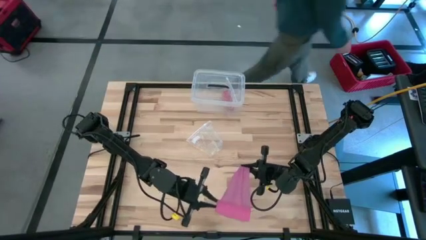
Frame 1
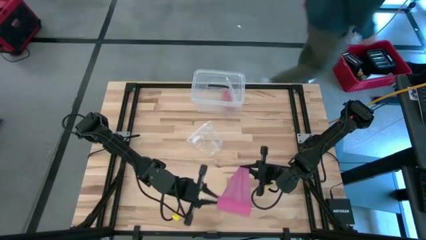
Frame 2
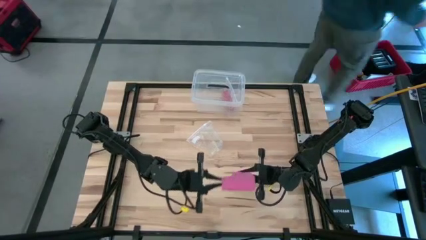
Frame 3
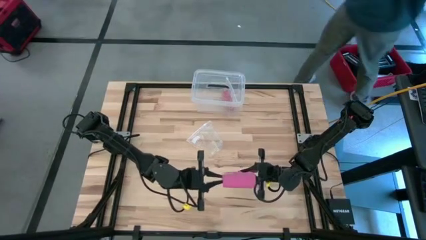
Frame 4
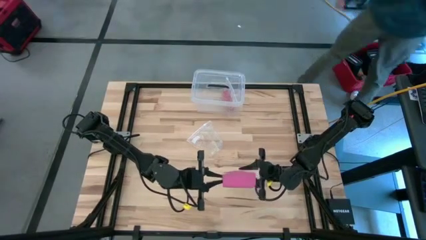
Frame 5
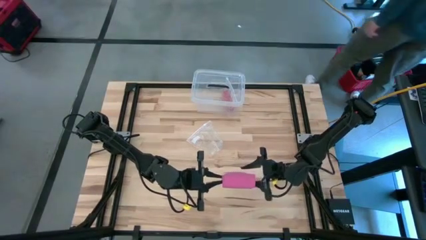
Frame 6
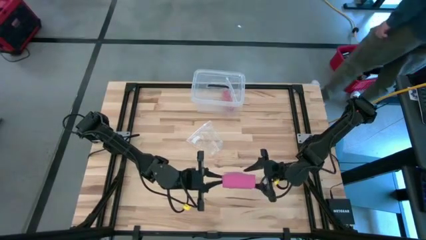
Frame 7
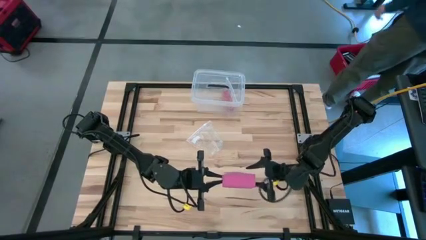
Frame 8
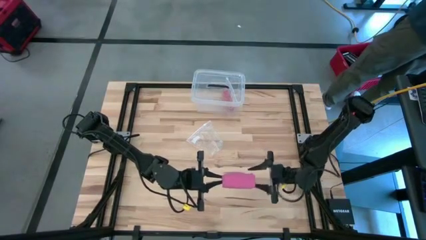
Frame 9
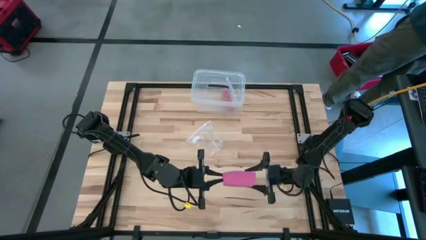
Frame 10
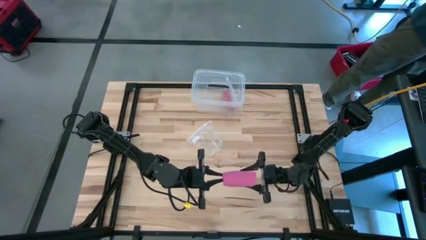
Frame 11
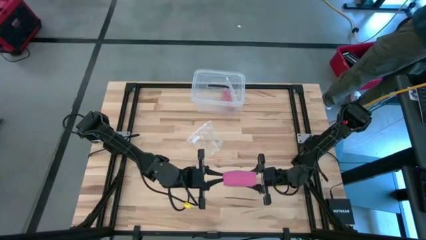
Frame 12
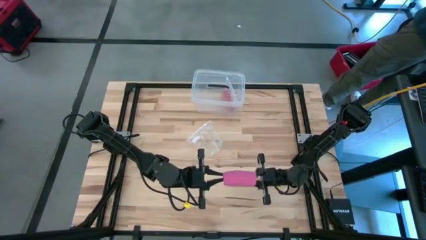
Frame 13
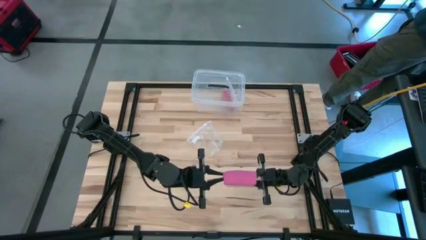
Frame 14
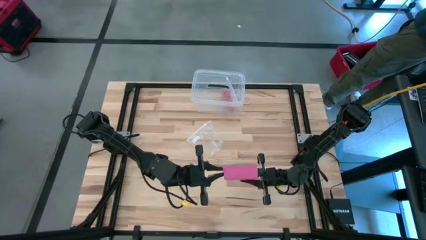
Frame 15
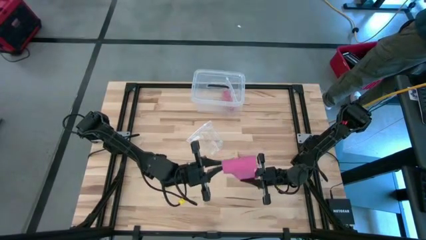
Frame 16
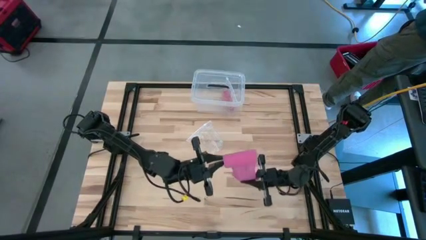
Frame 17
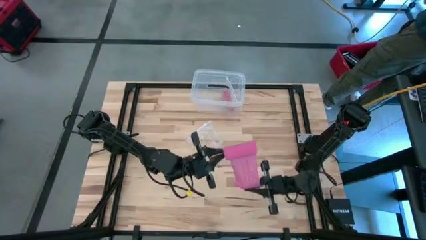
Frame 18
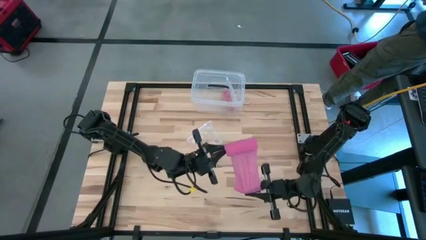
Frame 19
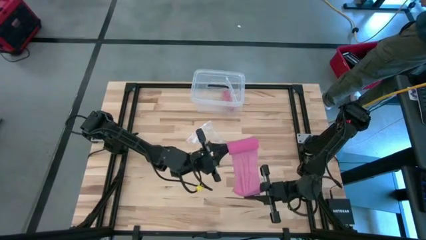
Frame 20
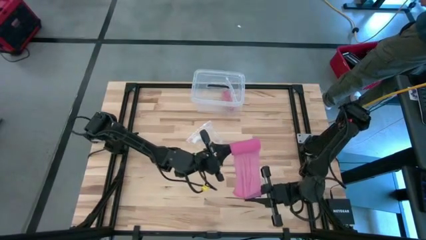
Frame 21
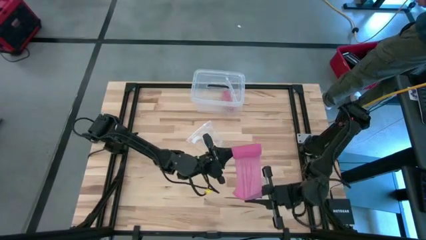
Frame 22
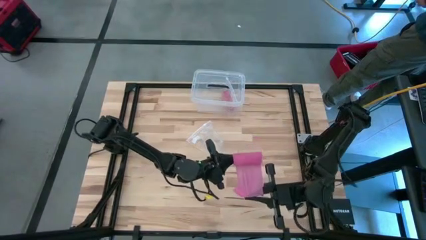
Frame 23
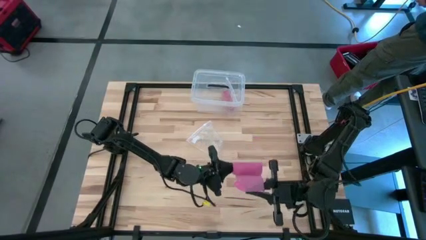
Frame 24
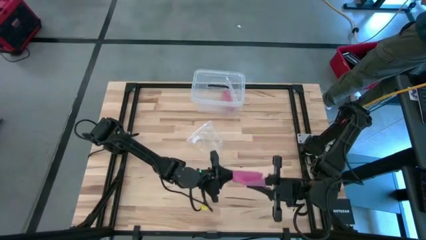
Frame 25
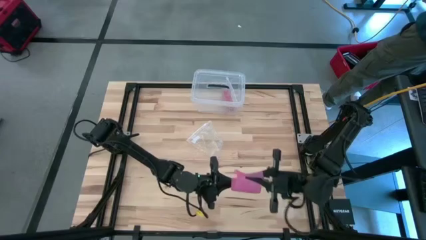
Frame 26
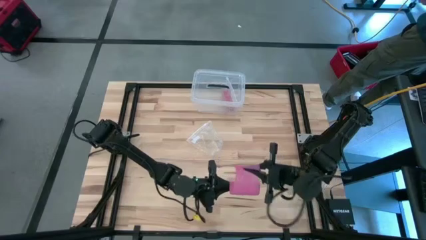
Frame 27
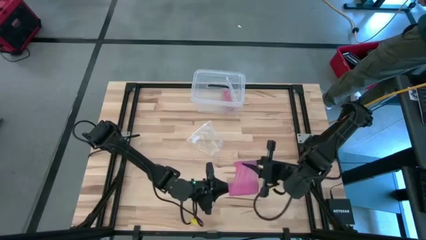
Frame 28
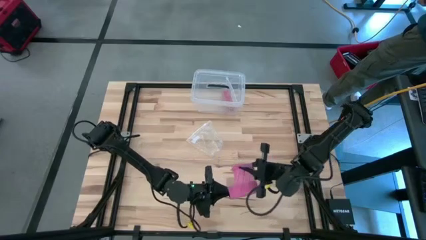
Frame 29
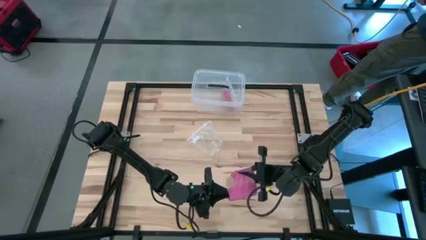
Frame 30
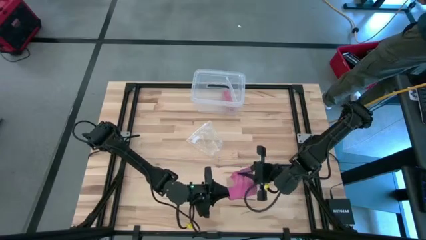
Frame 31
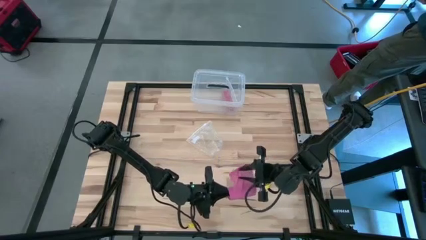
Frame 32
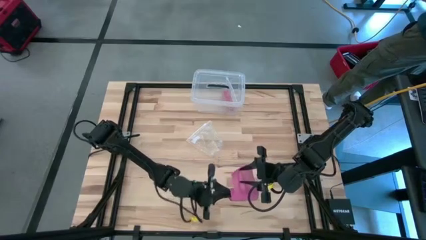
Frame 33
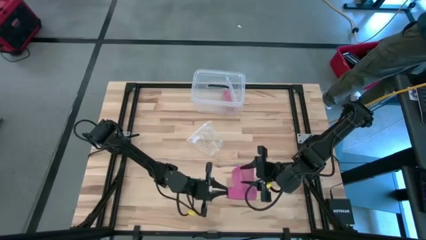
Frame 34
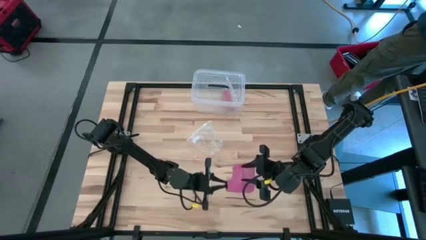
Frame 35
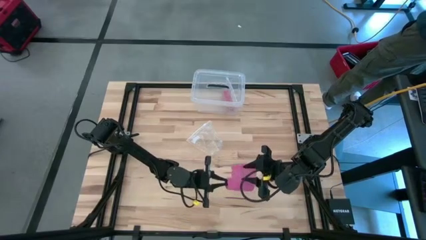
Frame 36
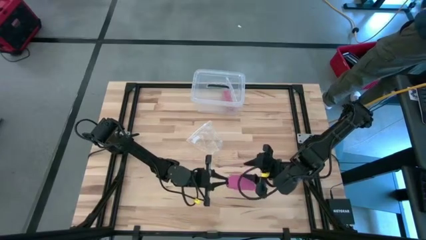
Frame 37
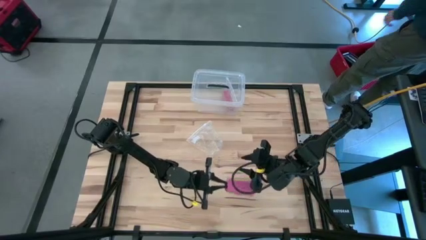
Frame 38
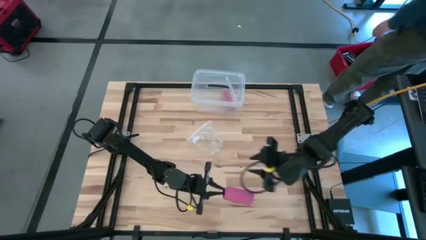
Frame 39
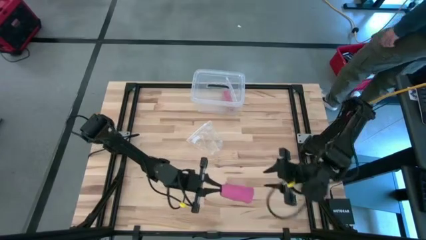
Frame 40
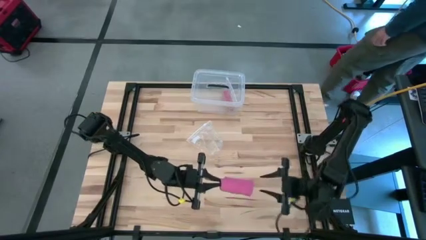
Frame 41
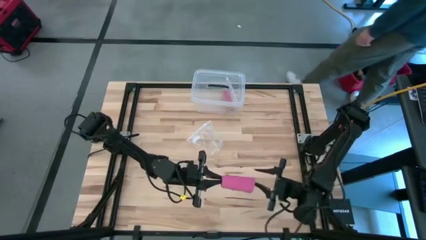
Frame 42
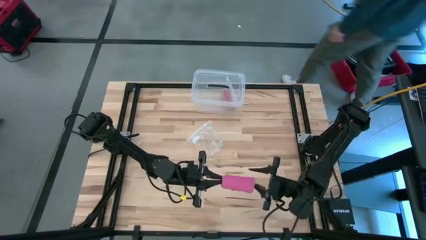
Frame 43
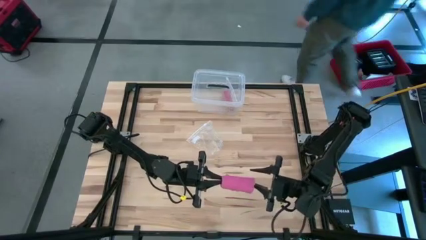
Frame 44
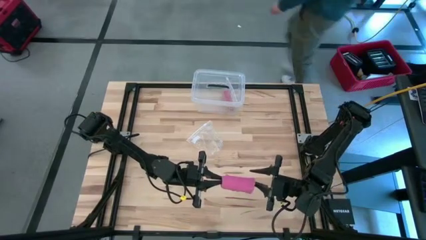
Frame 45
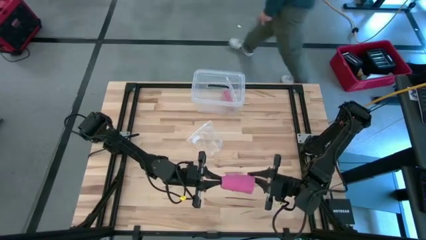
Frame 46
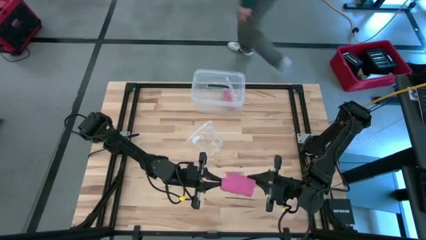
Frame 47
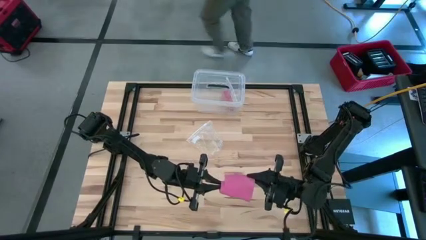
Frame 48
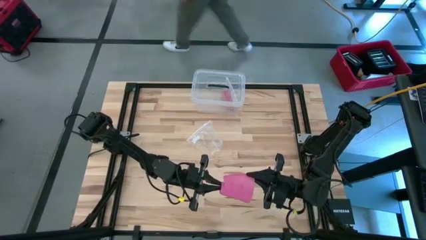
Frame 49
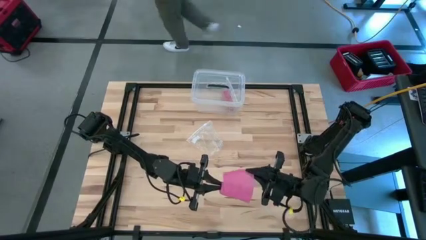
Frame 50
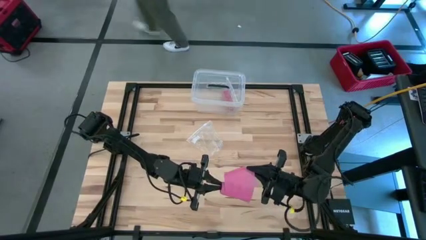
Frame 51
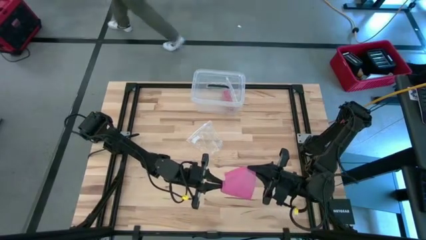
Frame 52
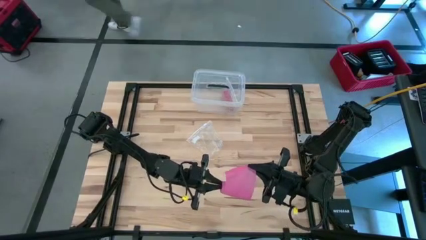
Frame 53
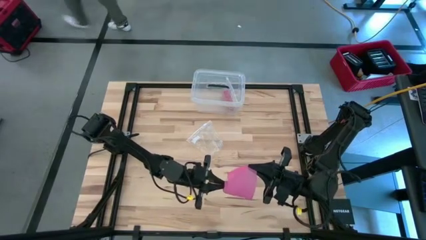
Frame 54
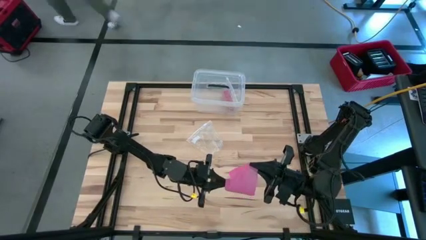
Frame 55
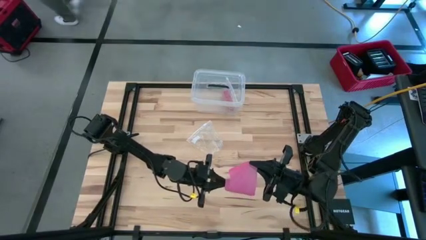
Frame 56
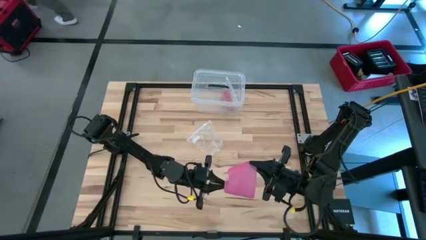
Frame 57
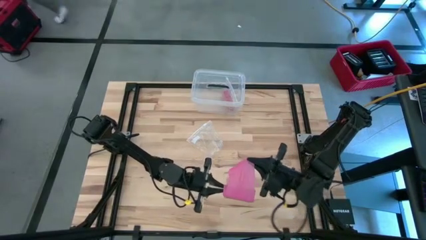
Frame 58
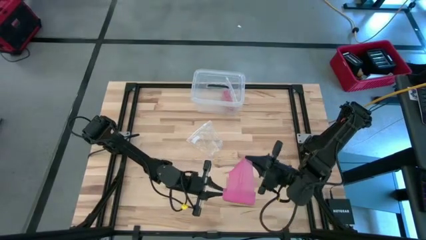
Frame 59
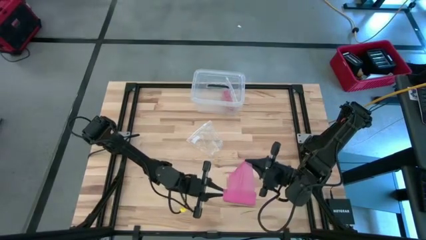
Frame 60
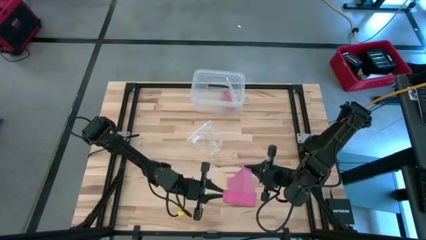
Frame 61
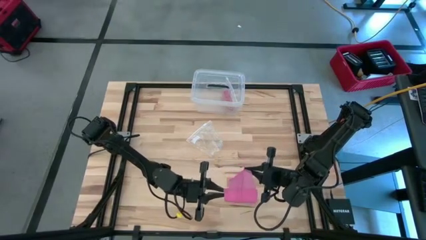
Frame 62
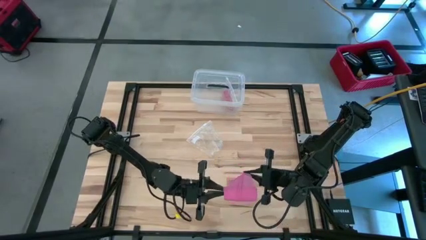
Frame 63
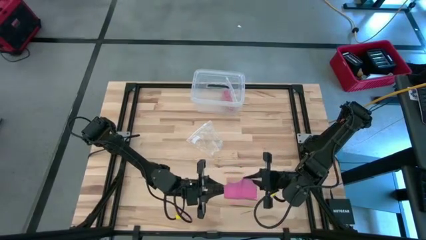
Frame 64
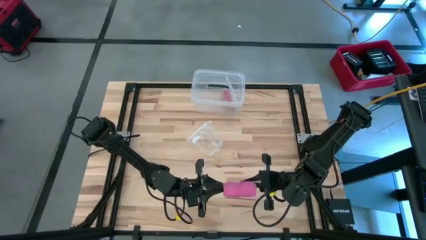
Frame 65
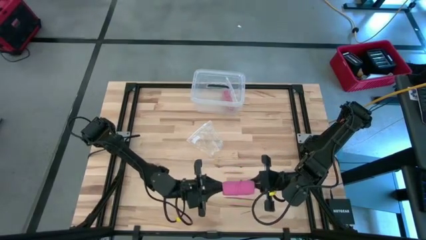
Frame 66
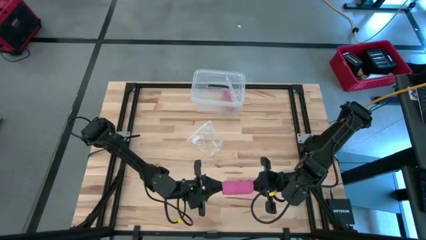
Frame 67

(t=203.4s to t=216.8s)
Task: Roll bandage
Roll the pink bandage

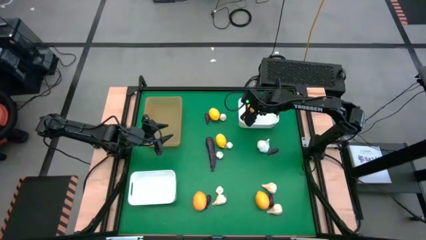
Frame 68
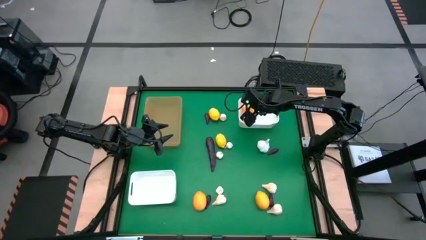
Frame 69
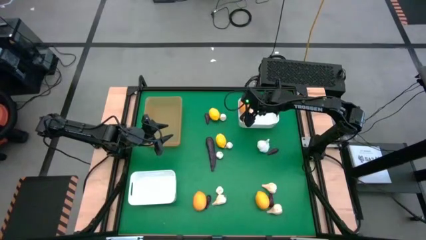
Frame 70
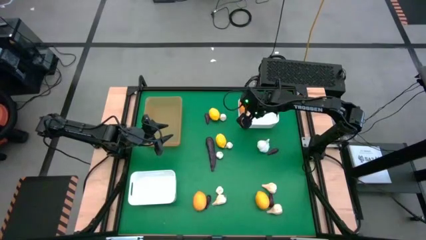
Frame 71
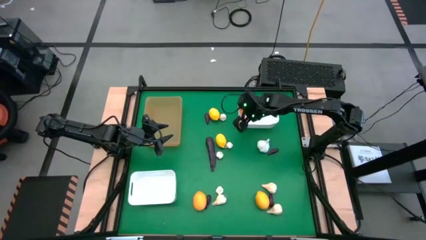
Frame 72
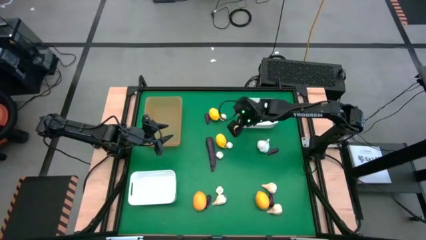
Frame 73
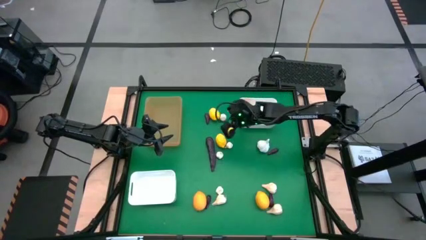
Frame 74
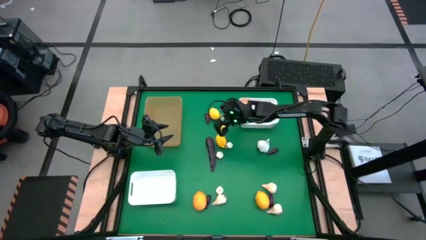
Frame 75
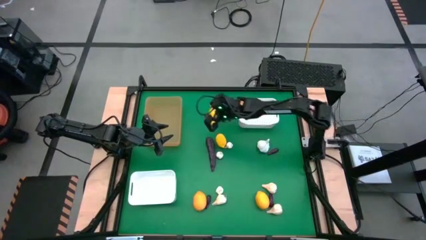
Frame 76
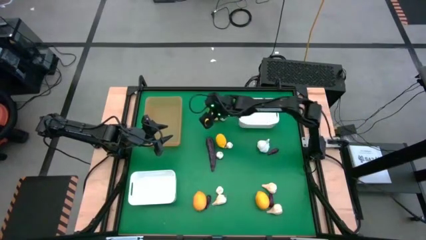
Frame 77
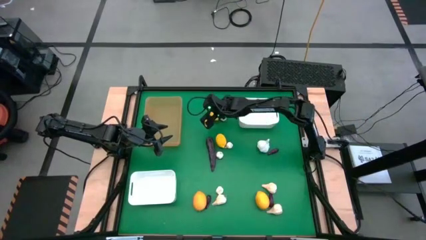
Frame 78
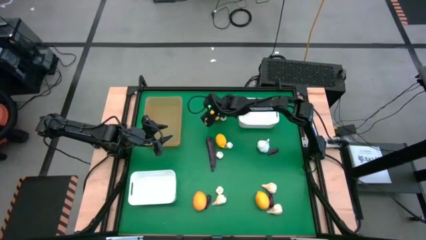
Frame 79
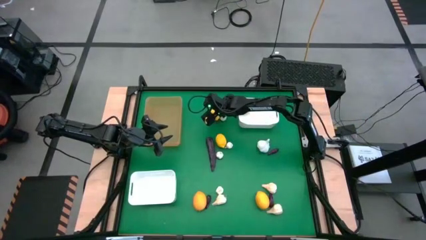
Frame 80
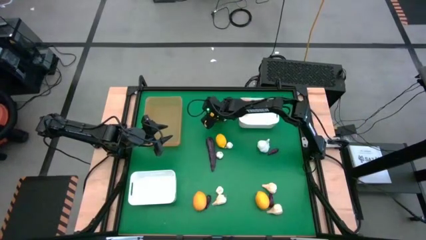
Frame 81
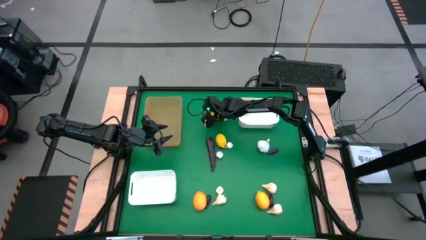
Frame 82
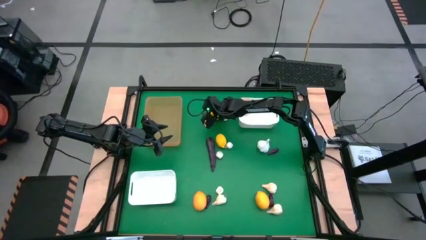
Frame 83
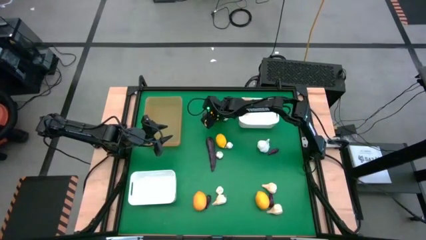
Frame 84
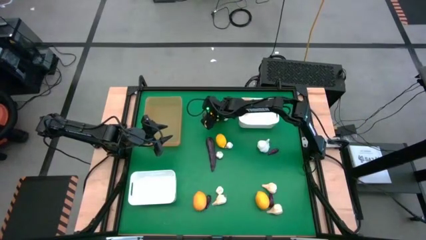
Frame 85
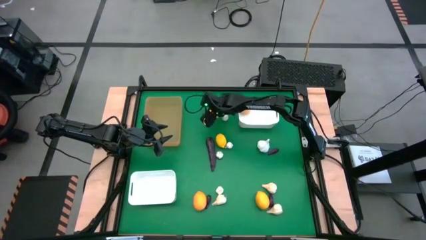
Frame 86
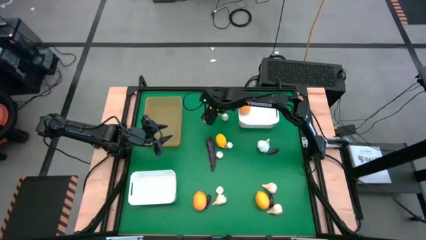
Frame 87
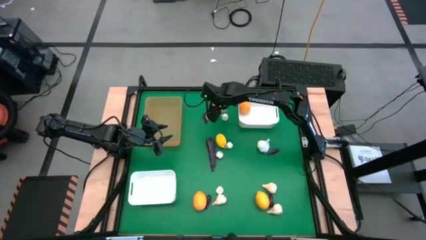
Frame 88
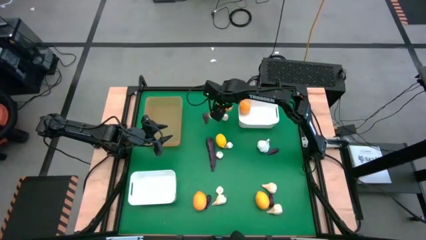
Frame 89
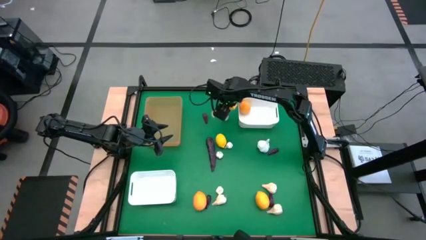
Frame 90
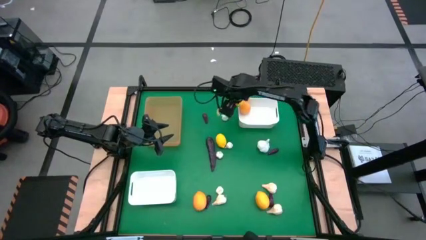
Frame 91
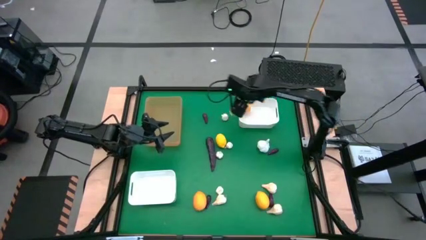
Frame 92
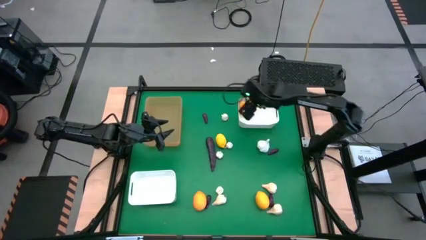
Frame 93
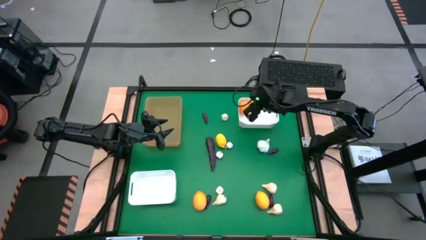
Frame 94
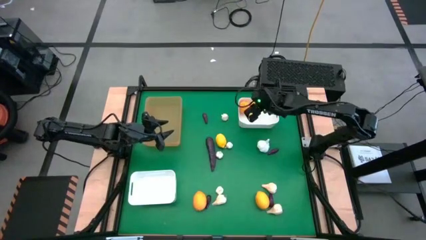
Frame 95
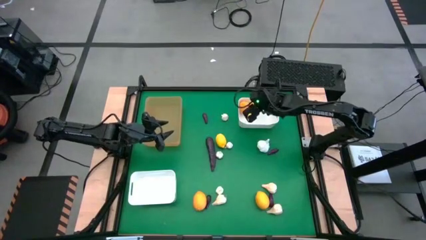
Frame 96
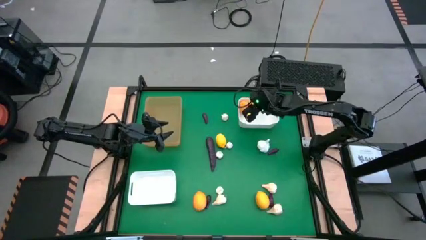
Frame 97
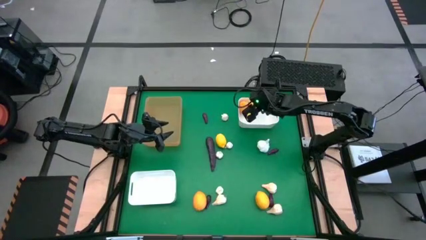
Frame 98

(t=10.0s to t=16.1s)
Task: Sort produce into baskets
Put the lemon into the top white bin
